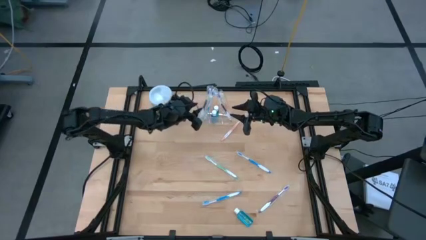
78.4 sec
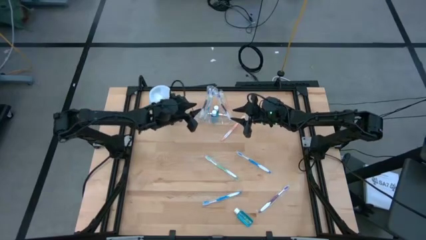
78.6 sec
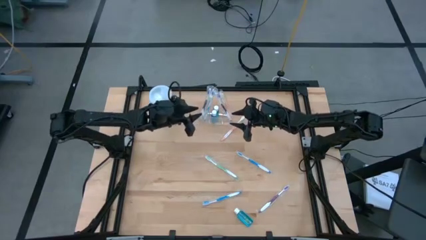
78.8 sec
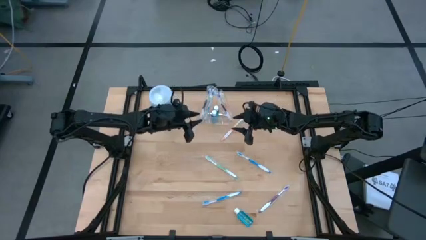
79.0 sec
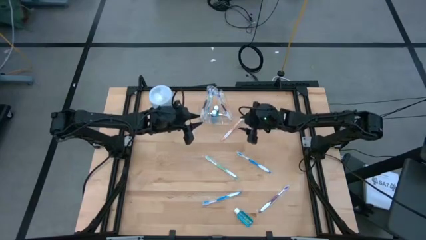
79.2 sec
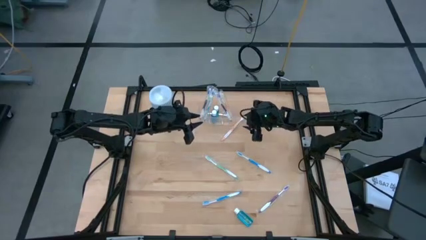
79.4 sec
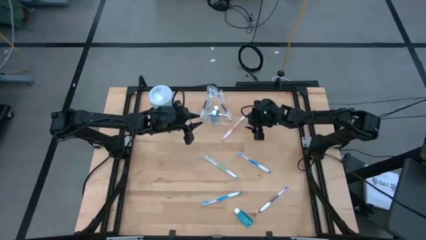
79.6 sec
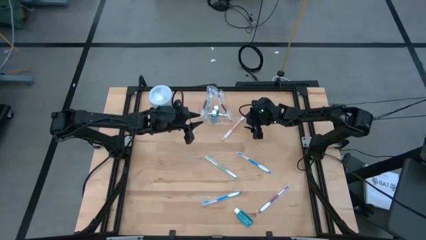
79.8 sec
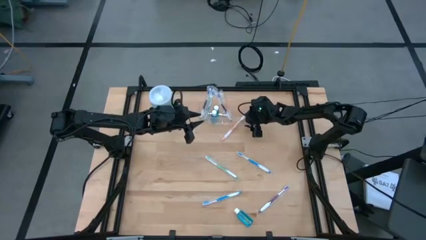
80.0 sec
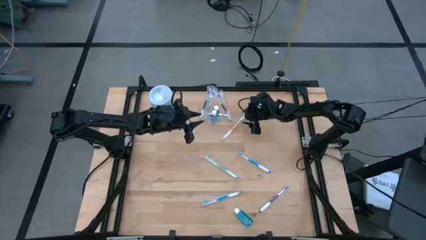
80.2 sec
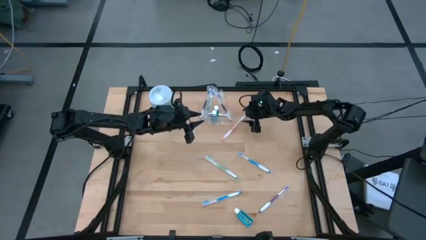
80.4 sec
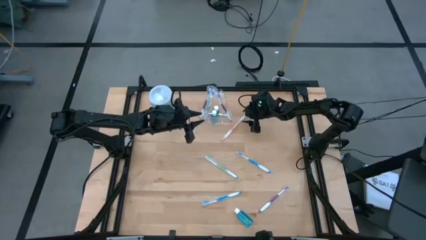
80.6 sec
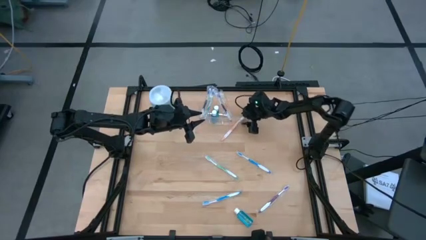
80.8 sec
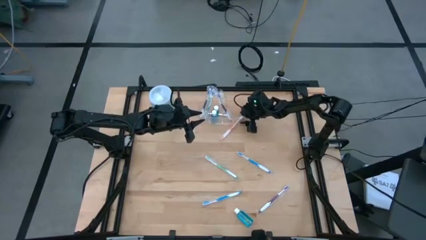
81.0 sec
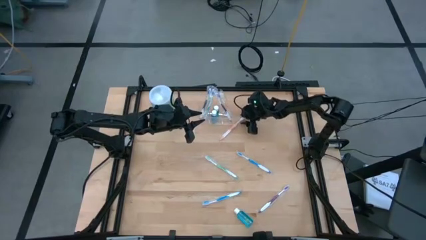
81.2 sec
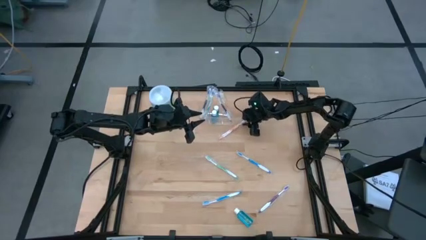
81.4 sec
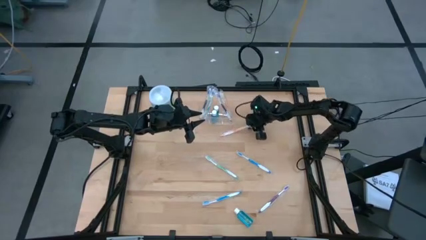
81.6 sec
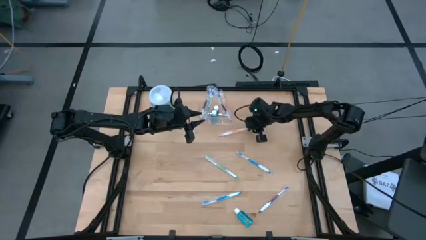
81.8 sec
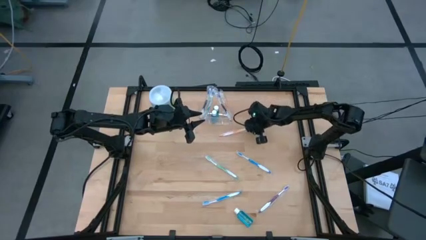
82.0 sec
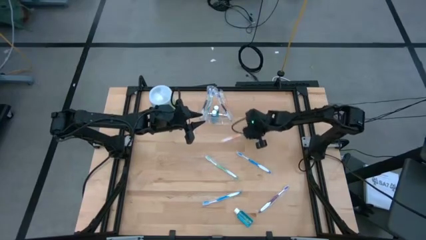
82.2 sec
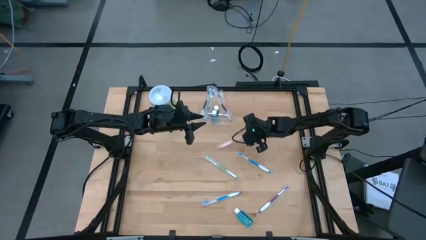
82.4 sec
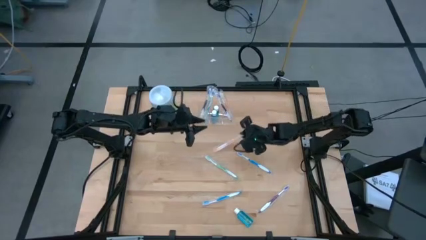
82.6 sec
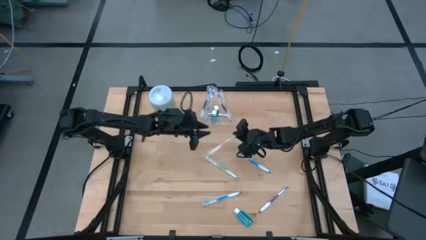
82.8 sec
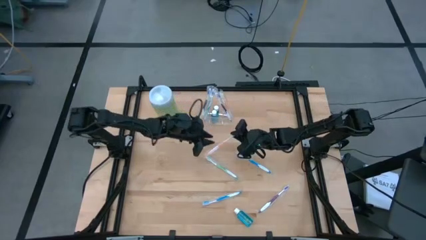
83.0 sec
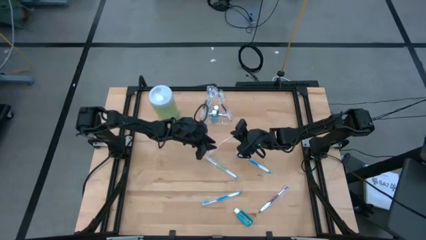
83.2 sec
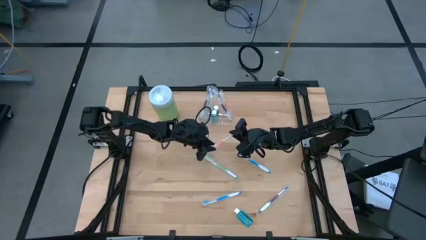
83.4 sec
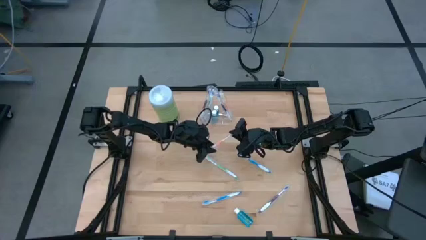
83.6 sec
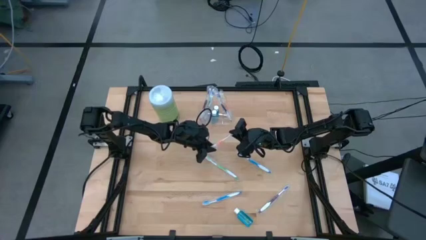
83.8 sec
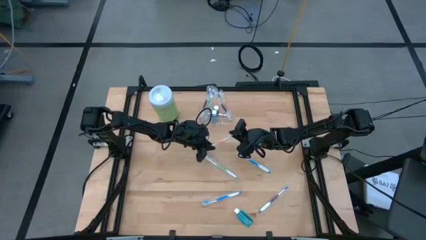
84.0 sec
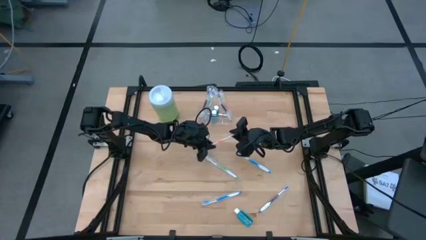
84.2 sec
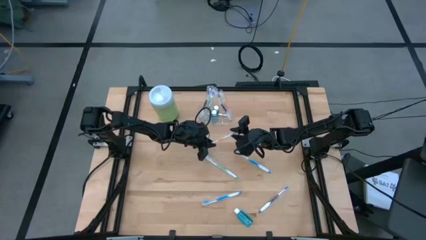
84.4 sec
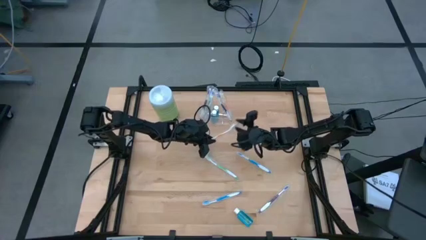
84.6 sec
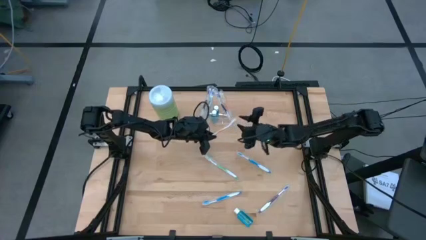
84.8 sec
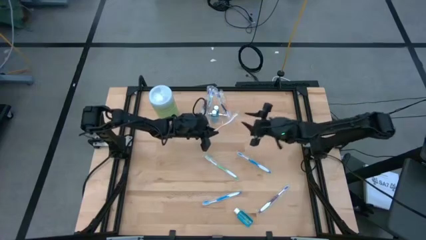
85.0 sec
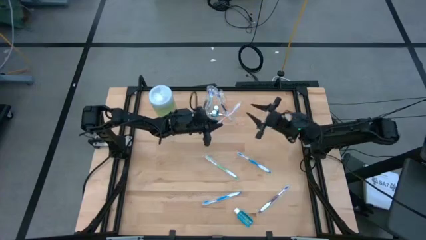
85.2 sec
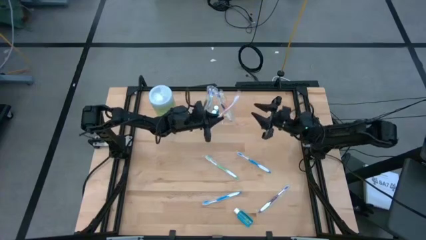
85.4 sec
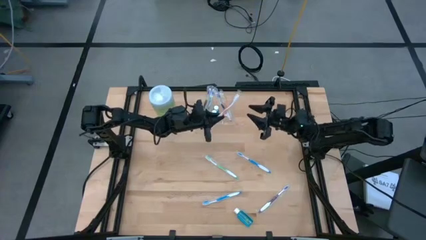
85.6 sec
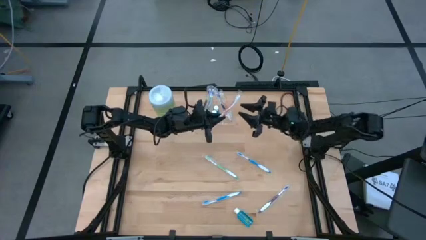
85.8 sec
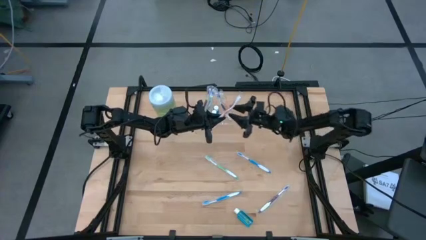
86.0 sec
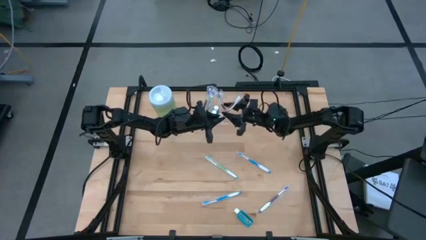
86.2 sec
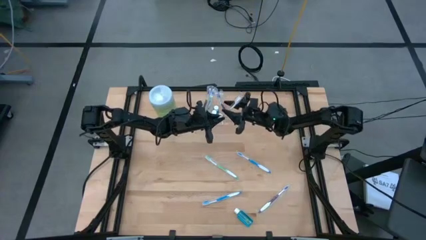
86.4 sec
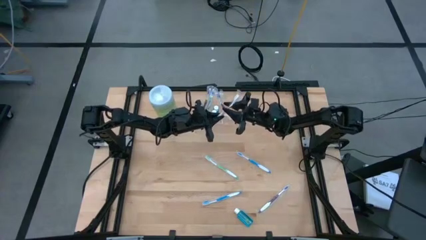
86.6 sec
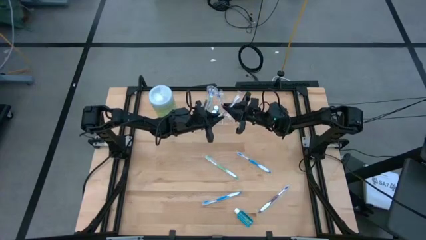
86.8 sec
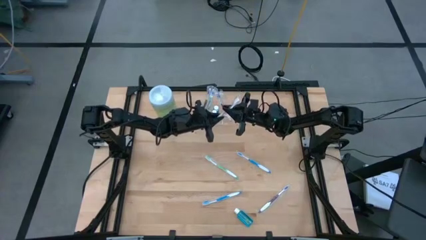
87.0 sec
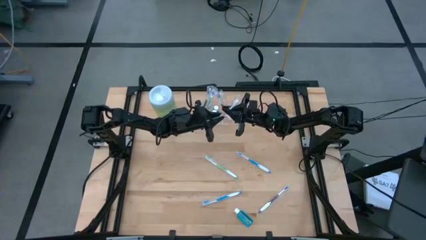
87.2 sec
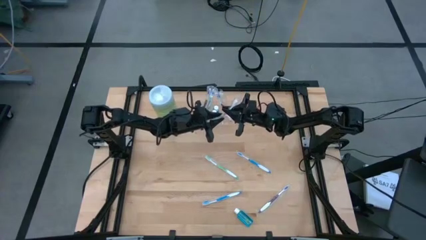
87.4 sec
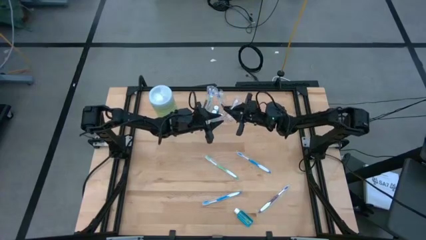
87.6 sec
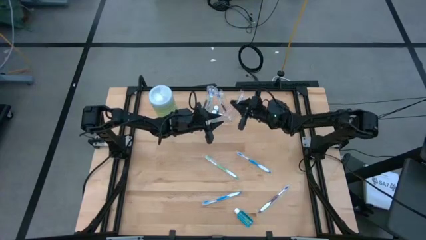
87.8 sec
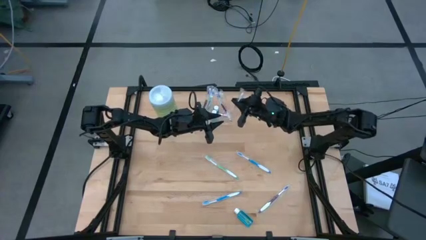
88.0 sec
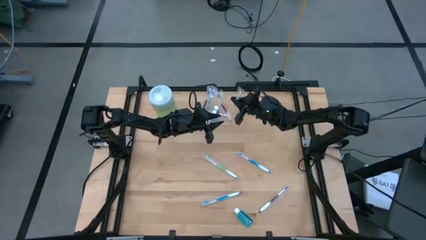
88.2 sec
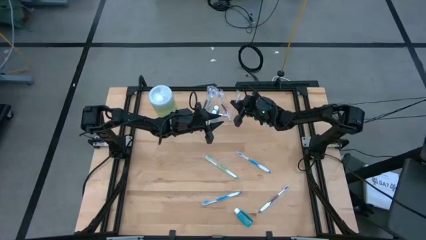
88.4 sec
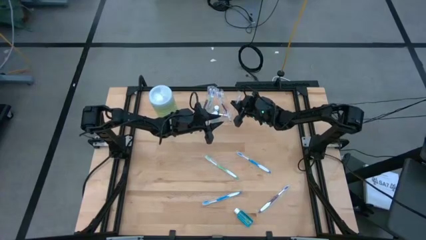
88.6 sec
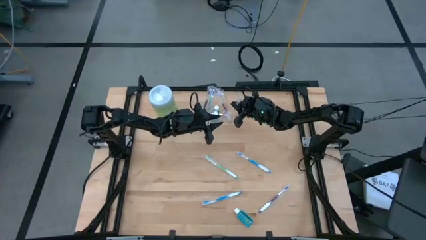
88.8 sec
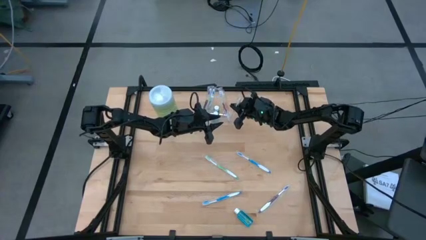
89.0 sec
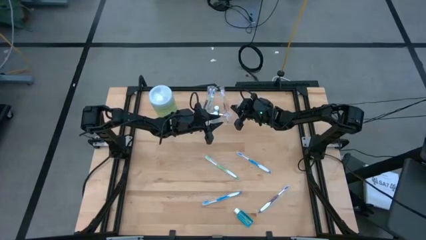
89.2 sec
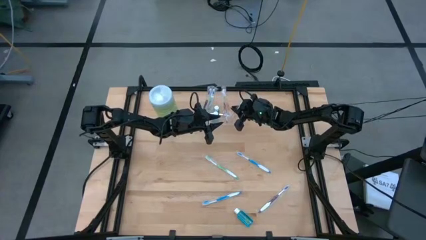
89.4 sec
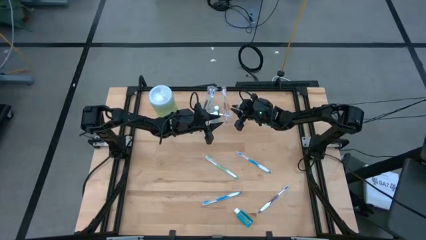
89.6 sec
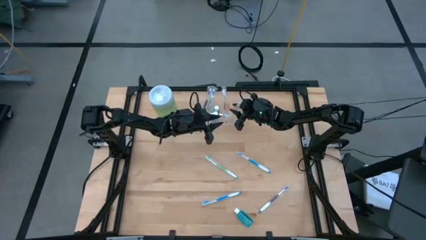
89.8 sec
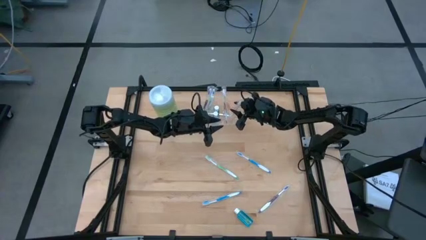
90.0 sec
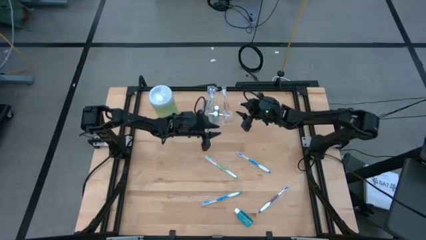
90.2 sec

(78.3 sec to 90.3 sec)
Task: Pick & Place toothbrushing station
Put the orange toothbrush into the transparent organizer

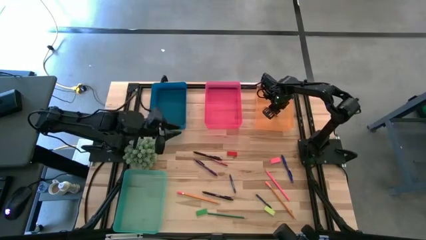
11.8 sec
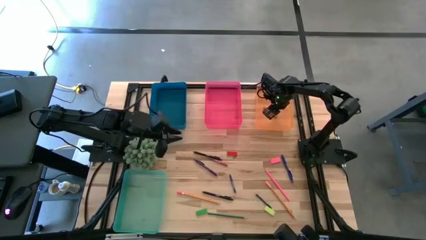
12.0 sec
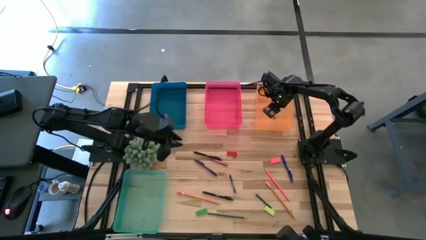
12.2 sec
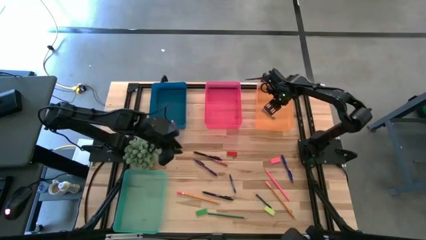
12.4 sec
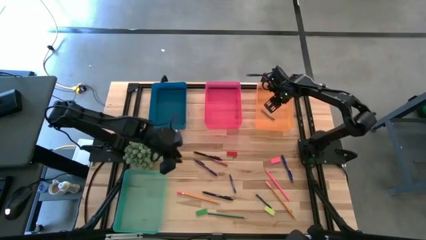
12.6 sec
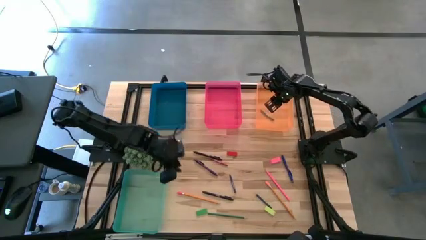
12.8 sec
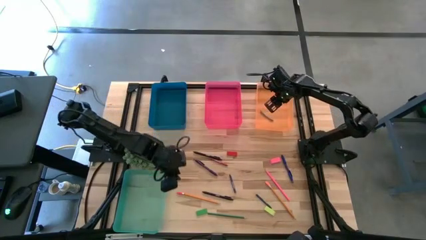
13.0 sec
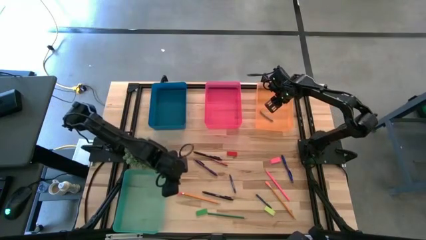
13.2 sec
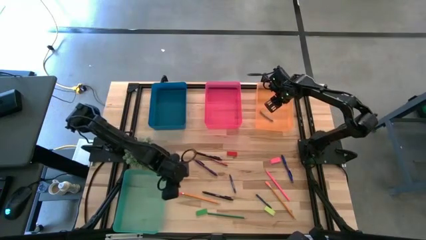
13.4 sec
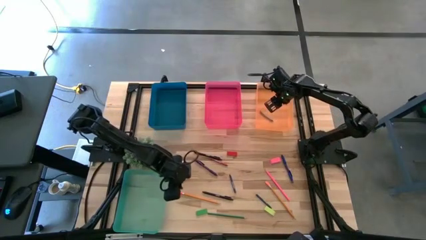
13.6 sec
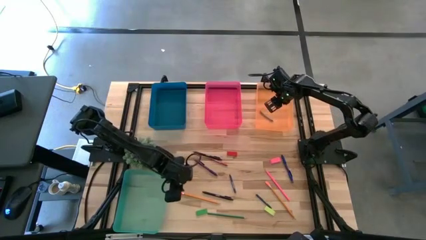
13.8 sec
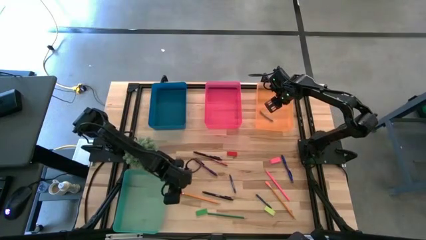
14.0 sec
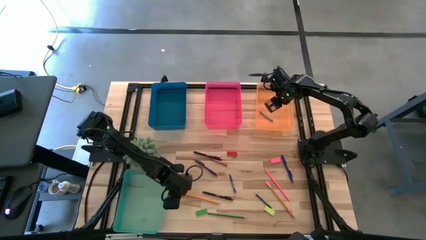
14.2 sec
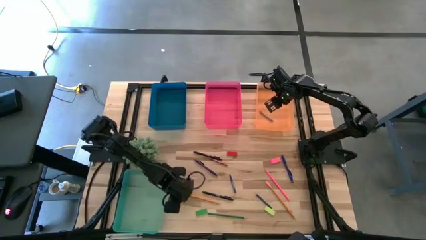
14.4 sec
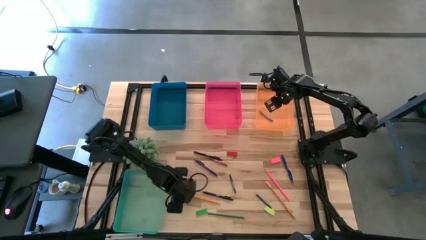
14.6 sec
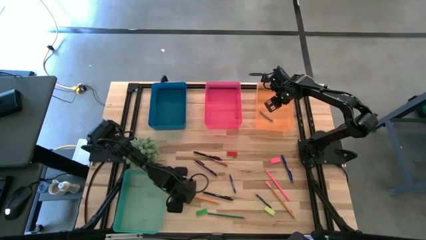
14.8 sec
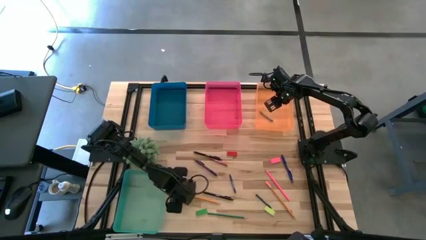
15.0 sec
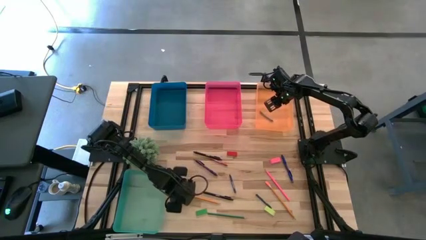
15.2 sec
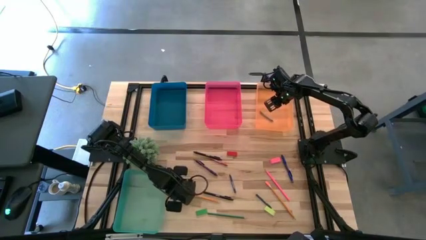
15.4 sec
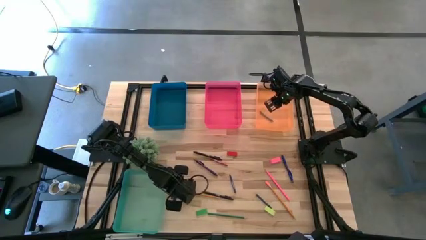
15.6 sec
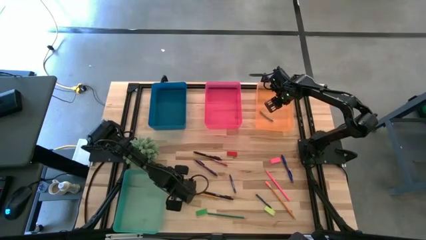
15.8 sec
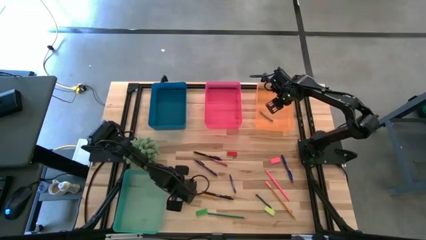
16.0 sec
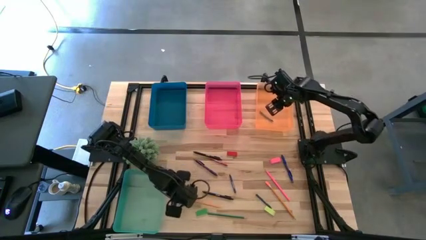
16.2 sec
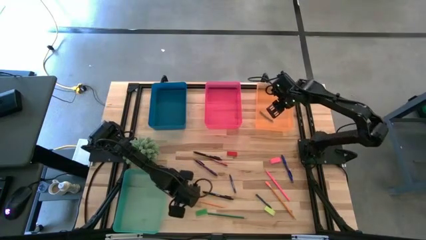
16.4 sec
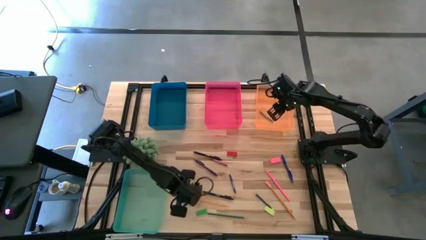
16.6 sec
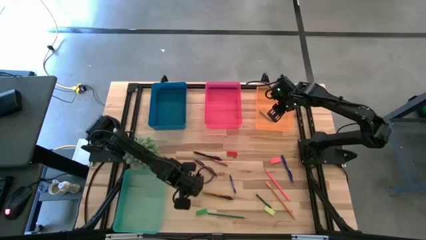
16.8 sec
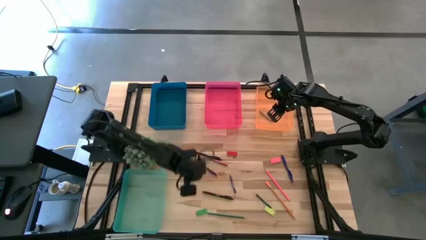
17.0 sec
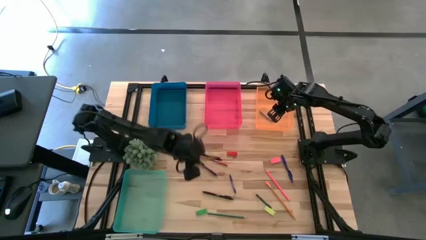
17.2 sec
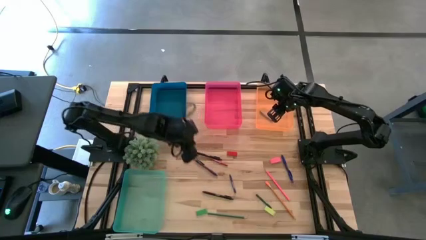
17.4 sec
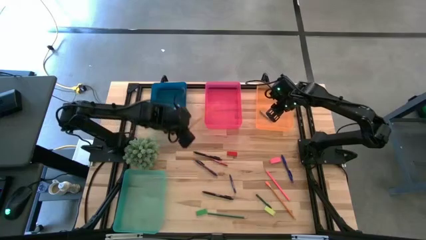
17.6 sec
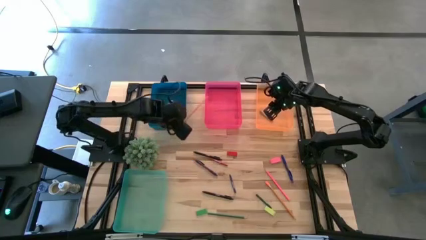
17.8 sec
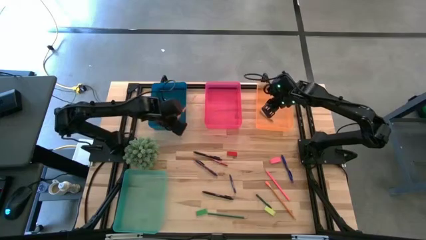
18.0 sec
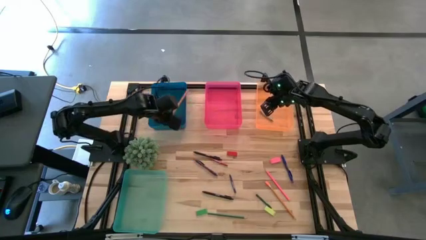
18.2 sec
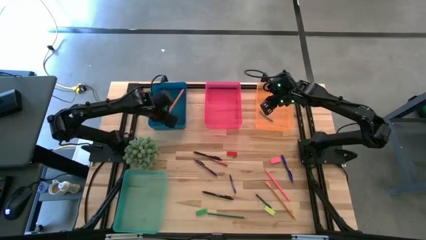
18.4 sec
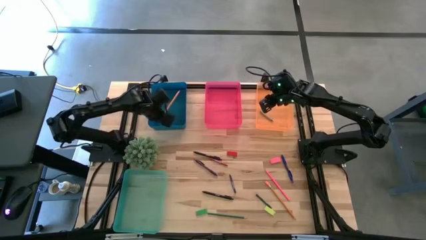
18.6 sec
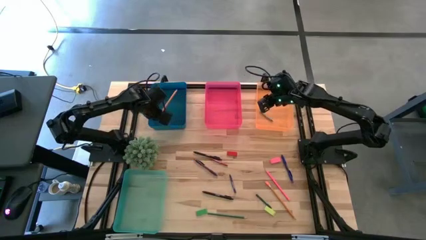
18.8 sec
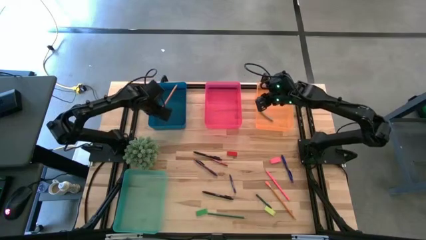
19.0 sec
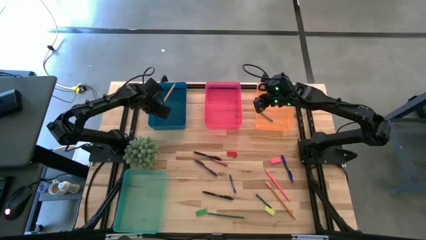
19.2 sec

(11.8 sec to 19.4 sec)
Task: Sort crayons/erasers/pens/pencils in bins
Put the yellow pencil into the blue bin
